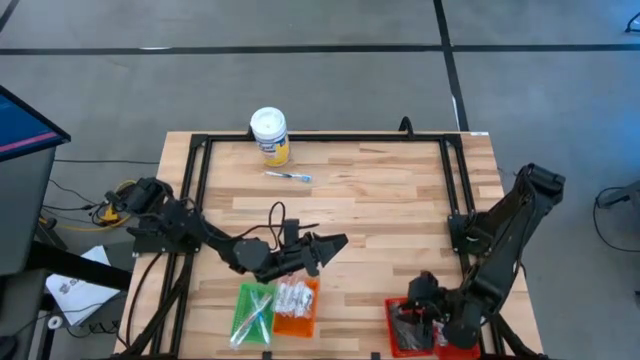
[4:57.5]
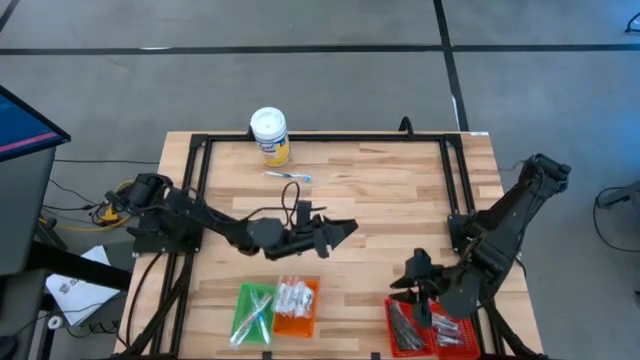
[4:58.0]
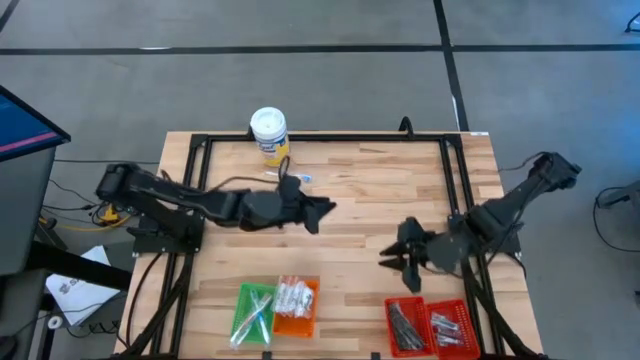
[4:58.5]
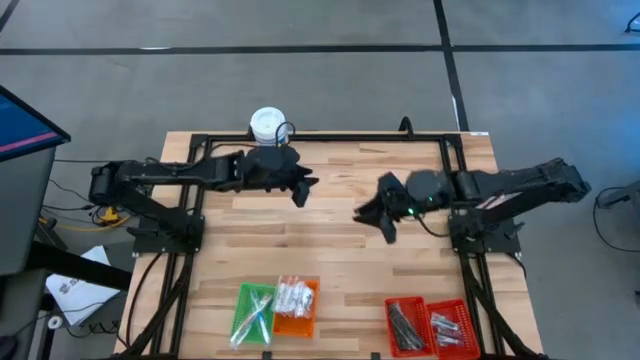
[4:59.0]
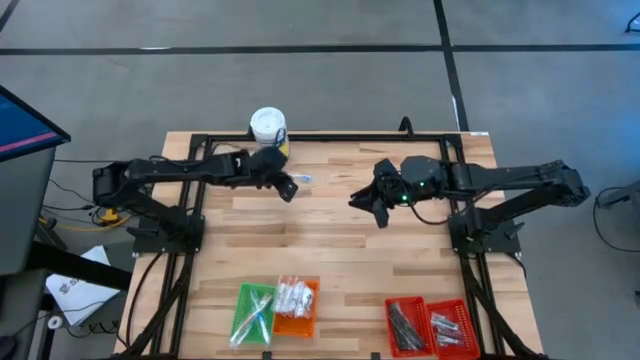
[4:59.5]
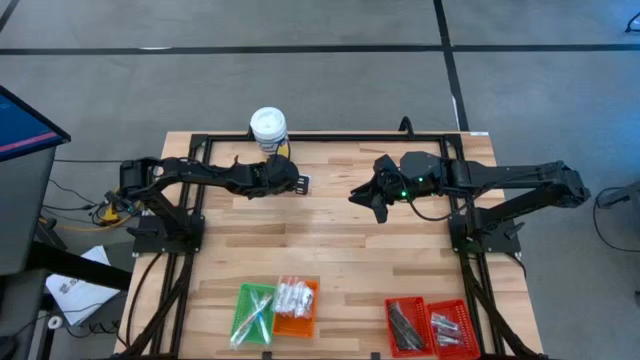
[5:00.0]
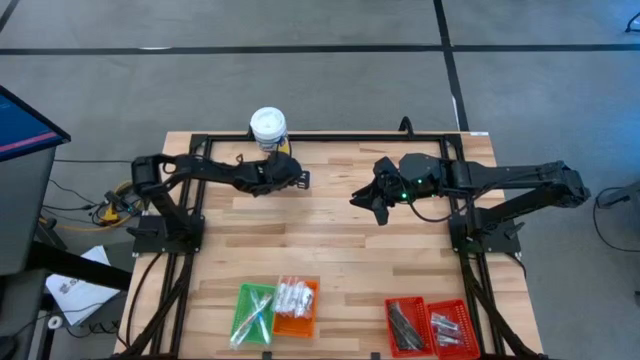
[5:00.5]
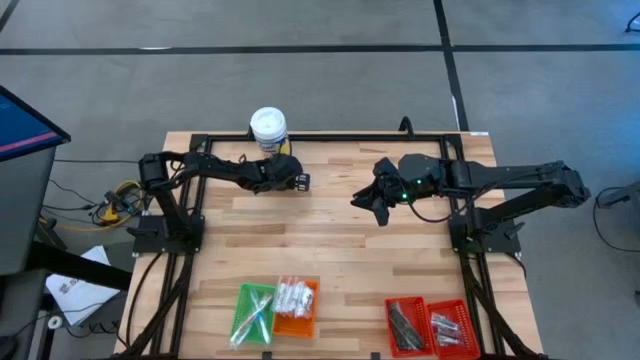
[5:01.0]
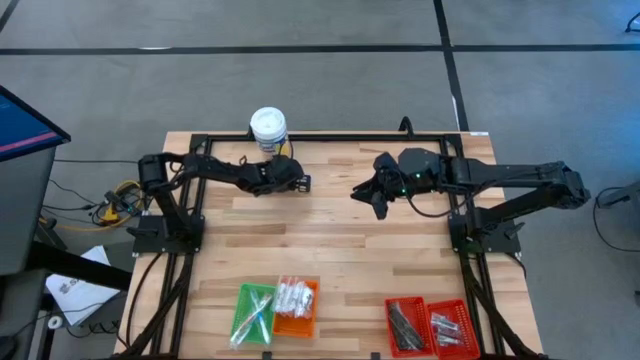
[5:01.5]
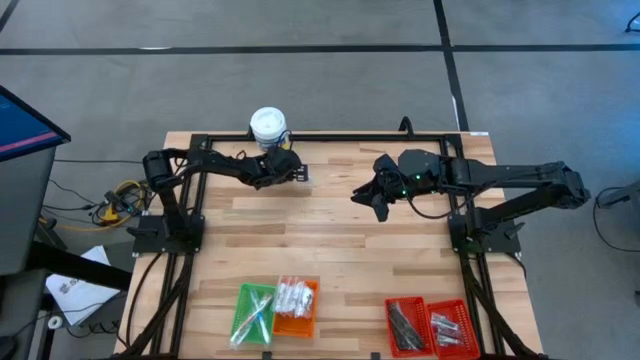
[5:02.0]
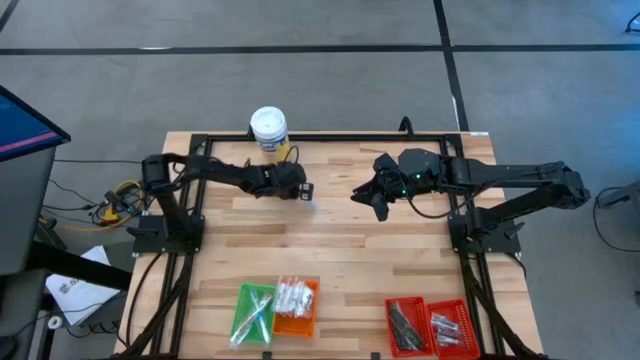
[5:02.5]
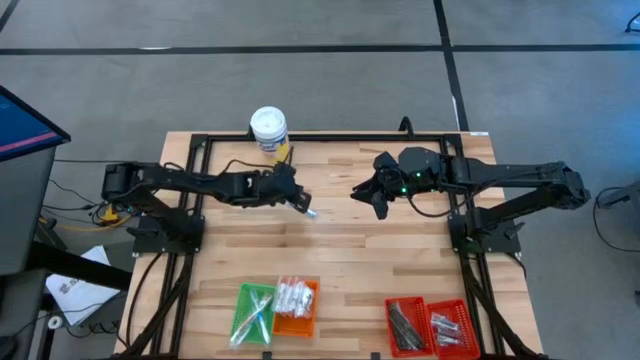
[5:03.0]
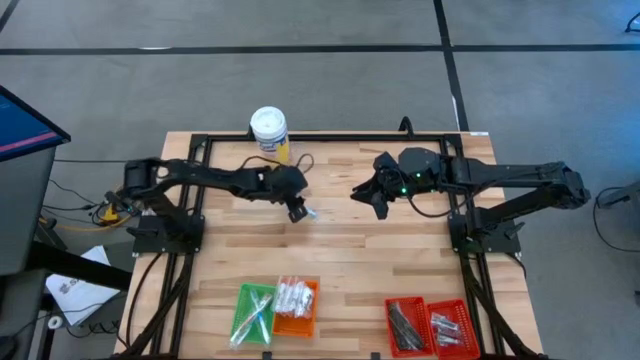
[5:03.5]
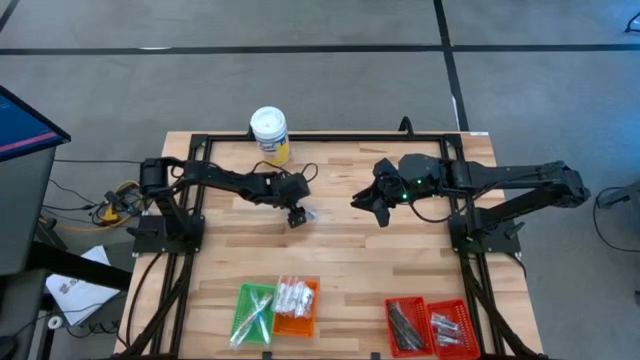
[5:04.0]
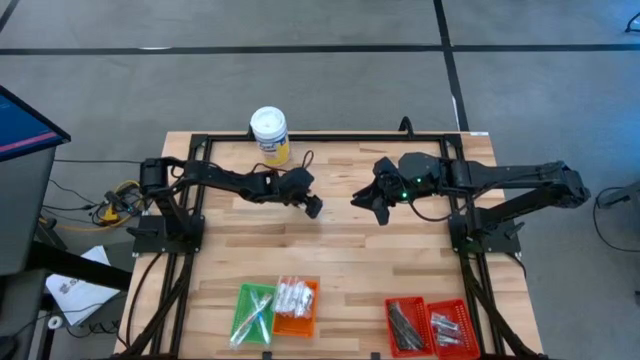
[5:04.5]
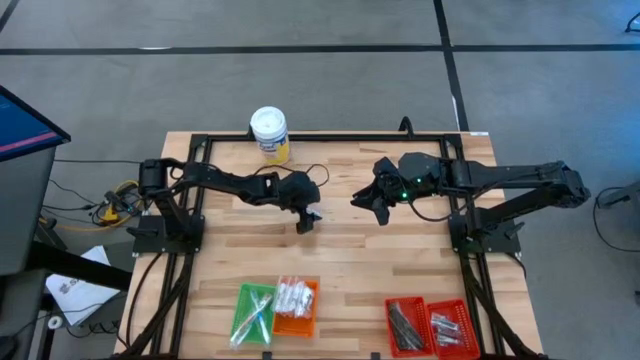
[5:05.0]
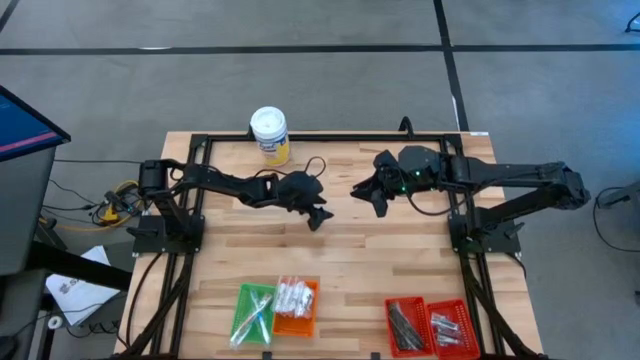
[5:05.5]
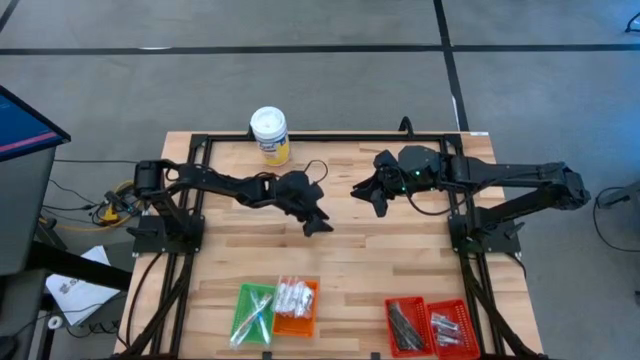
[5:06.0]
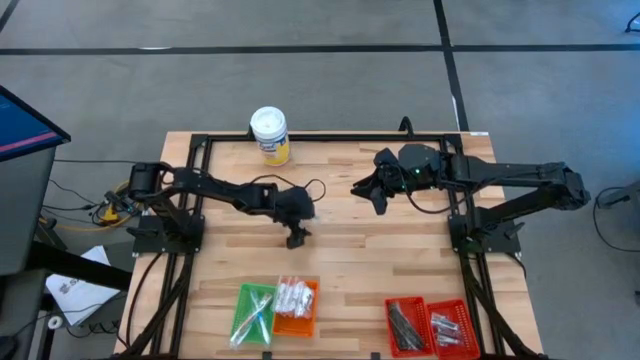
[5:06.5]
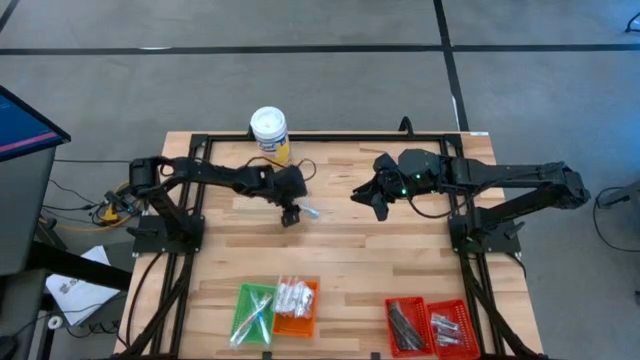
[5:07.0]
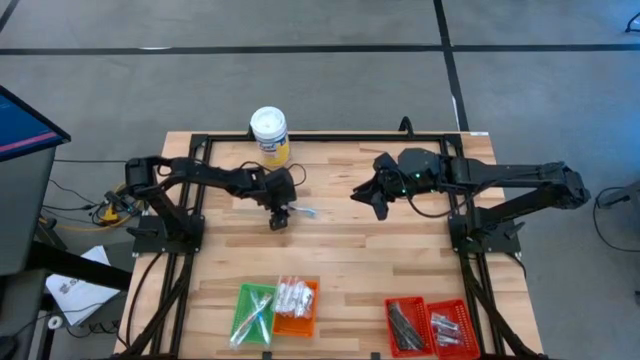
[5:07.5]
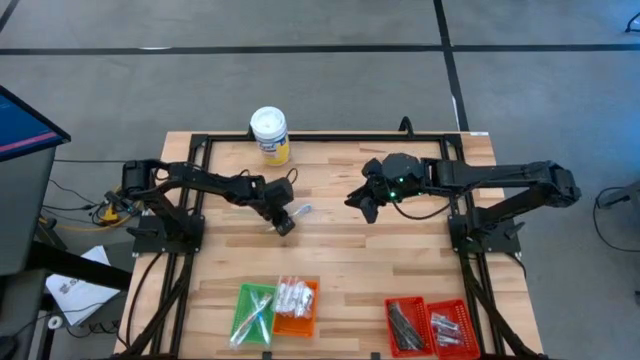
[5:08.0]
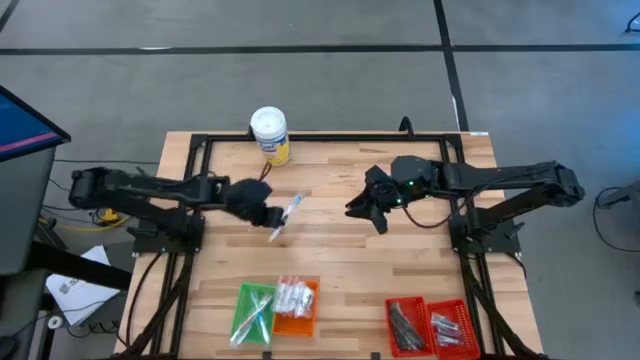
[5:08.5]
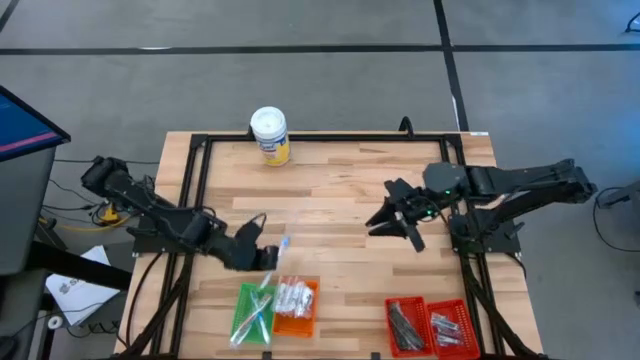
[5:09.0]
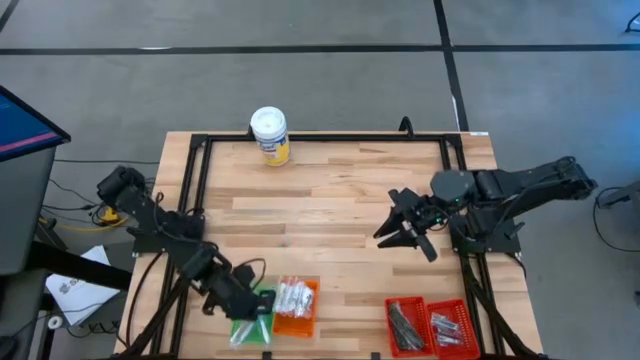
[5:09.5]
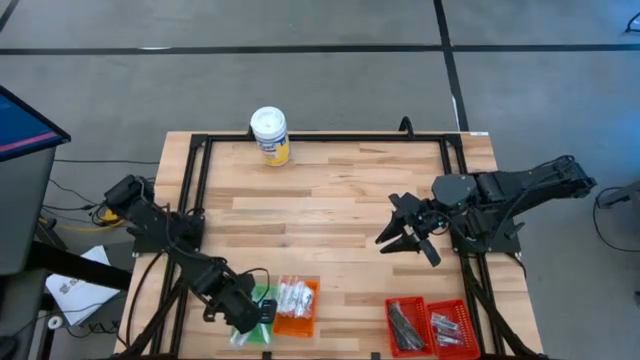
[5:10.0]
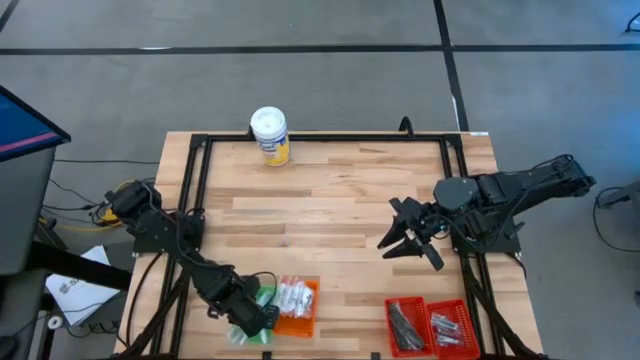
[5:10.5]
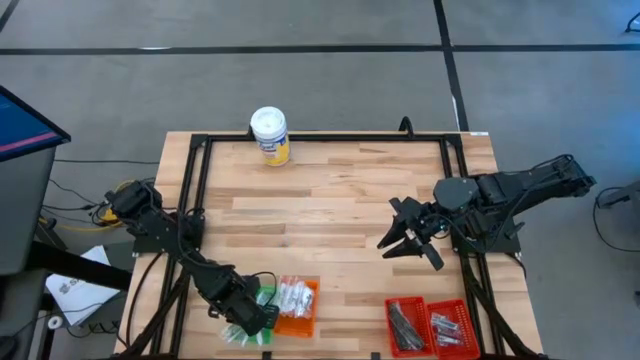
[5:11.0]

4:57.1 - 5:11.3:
Task: Pick & Place Travel size toiletries
Put the blue toothbrush into the green basket

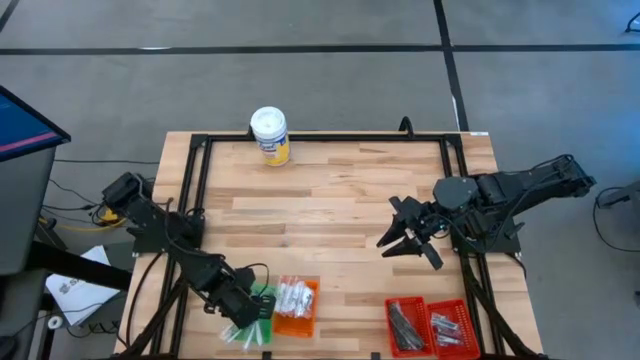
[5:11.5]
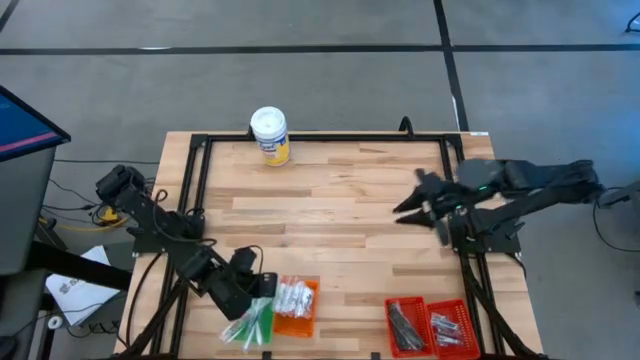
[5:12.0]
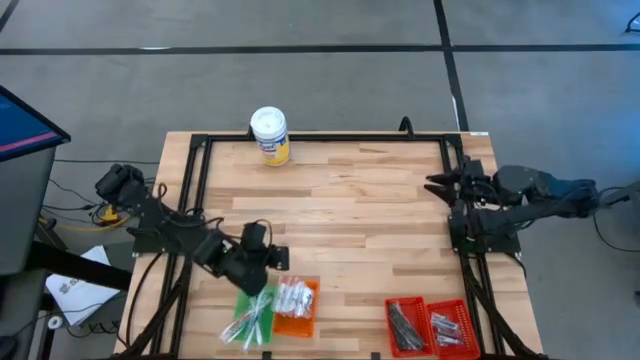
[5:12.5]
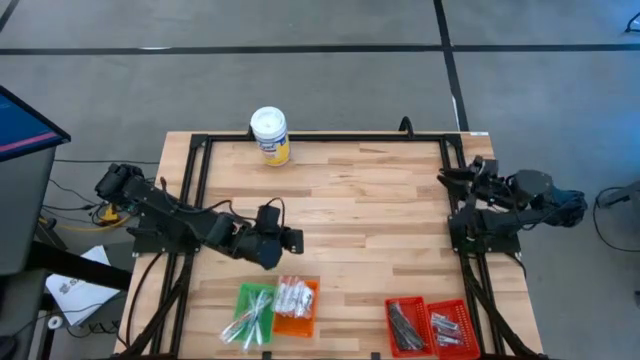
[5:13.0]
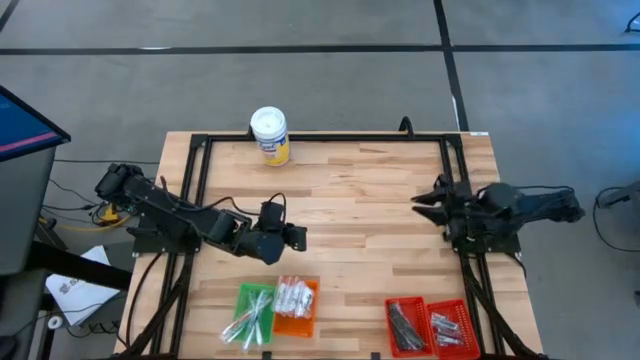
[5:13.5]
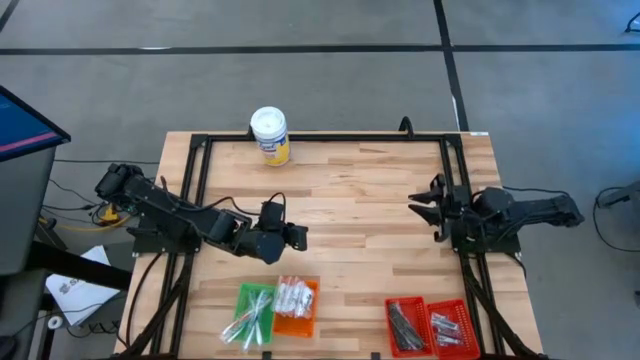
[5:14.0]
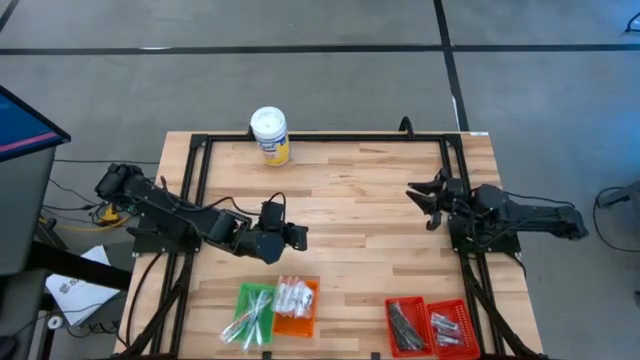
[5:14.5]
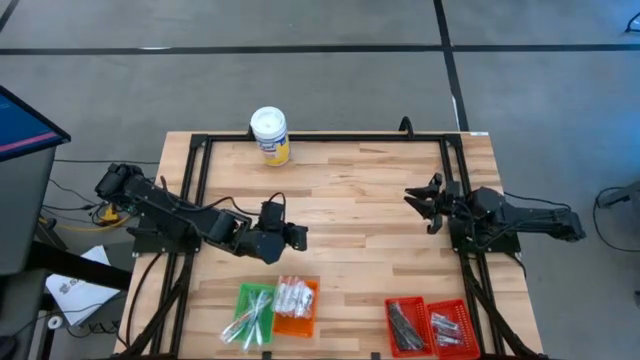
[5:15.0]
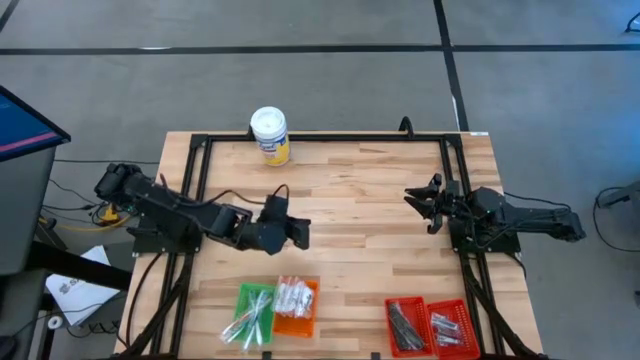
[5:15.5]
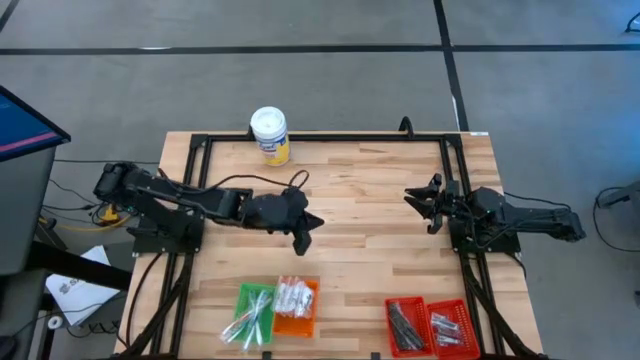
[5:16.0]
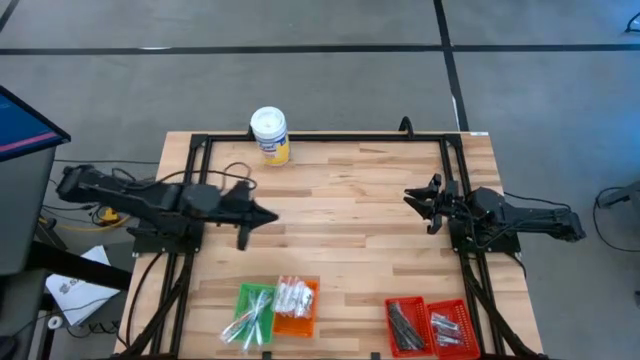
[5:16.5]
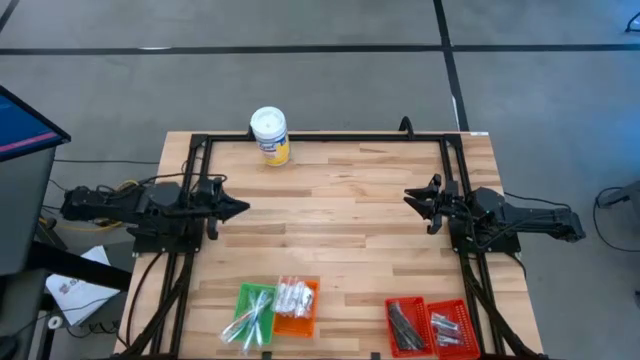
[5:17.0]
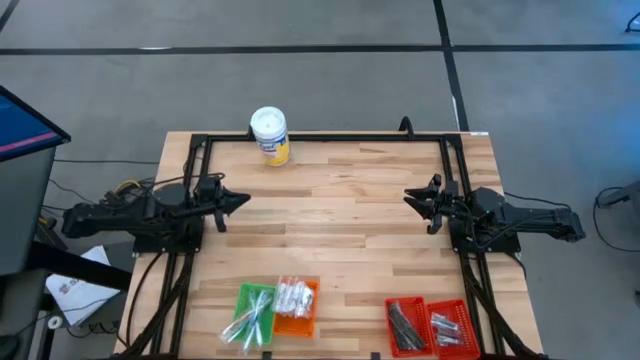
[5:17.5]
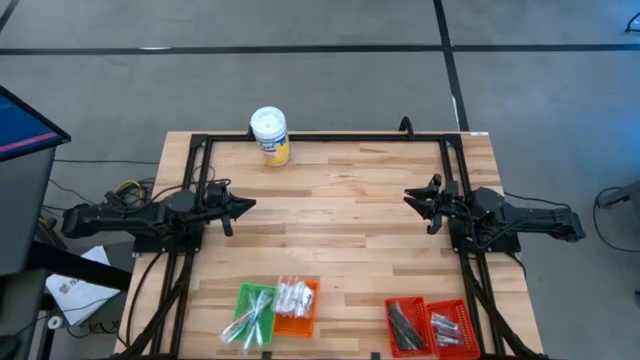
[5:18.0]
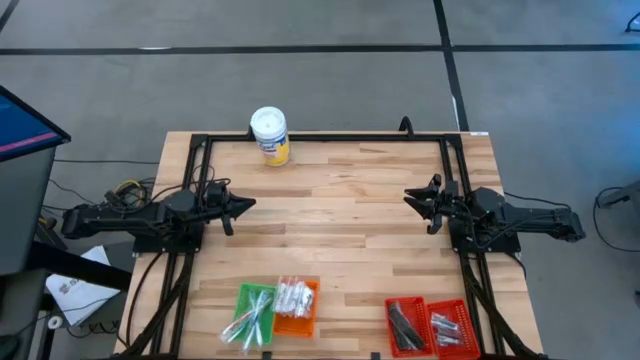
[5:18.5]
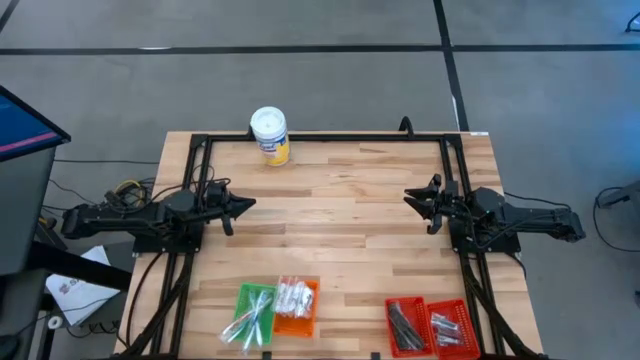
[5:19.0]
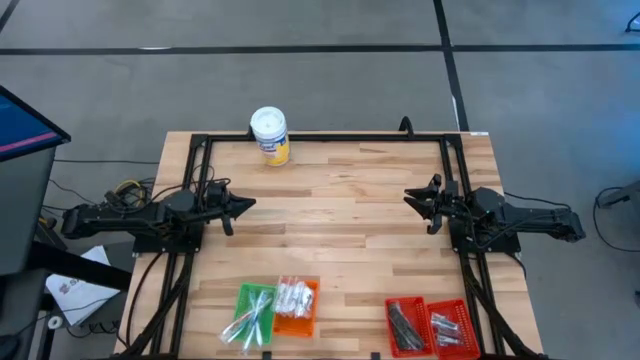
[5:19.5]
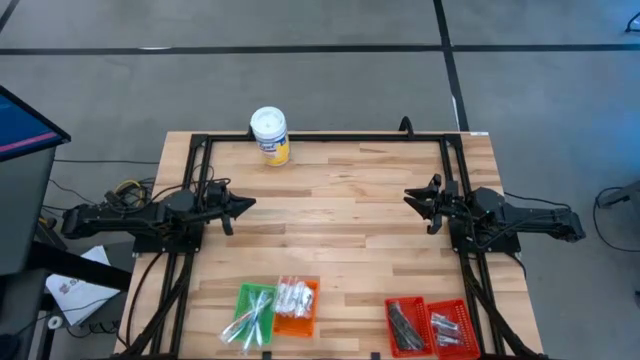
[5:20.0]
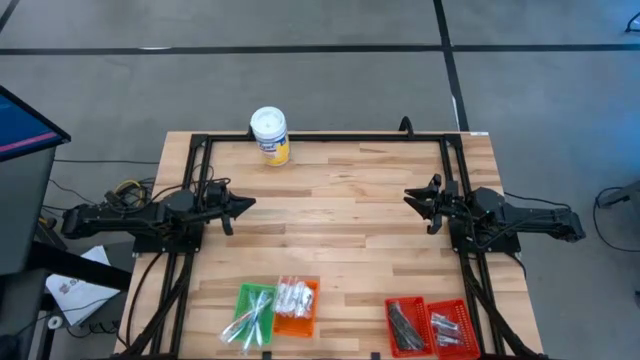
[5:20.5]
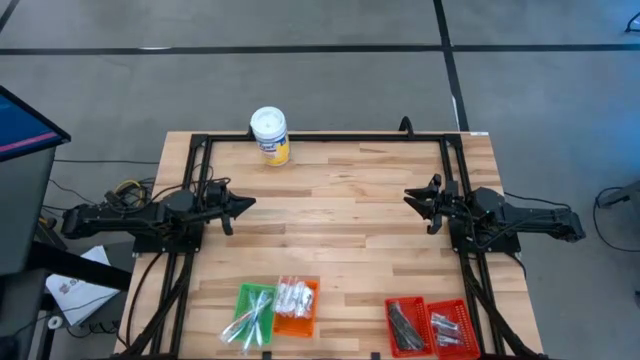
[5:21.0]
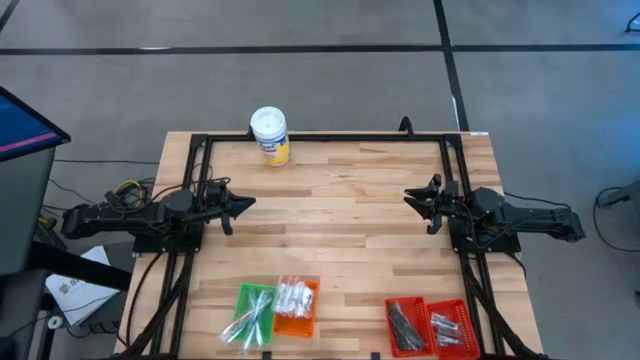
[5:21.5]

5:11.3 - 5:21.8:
Return to Home Position
